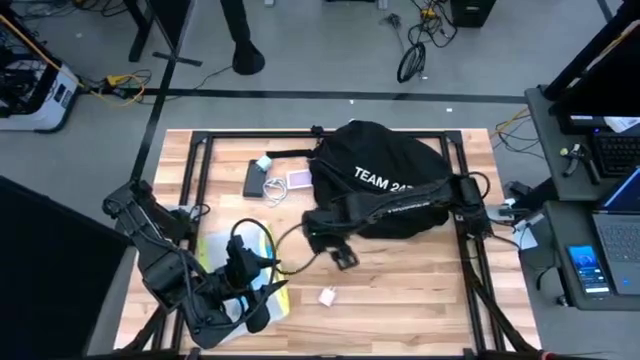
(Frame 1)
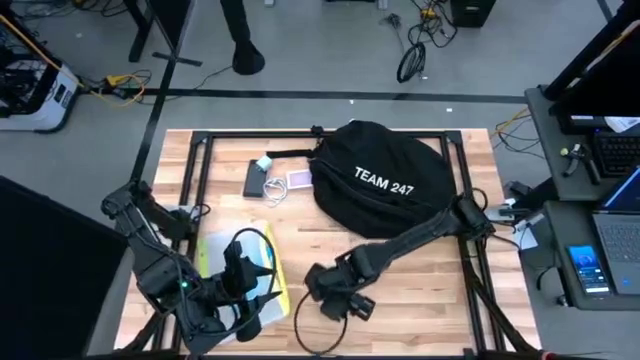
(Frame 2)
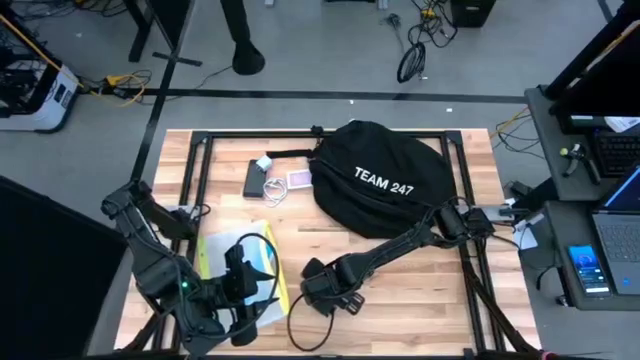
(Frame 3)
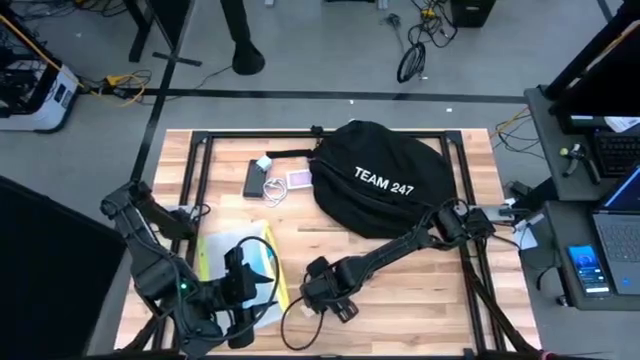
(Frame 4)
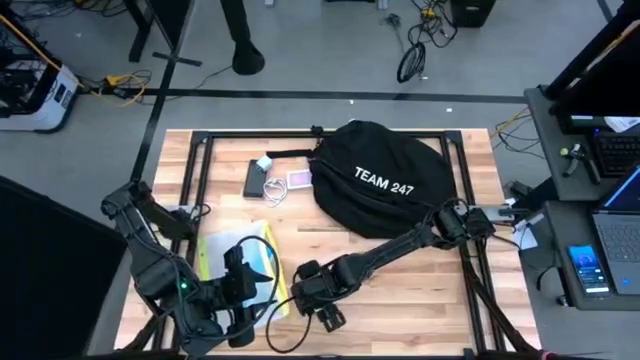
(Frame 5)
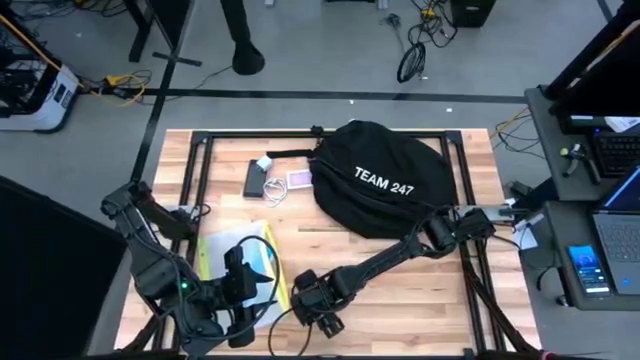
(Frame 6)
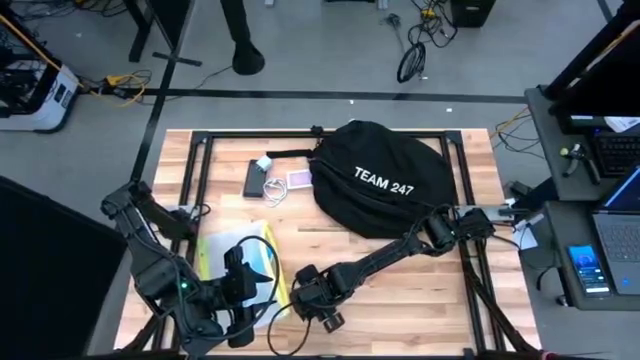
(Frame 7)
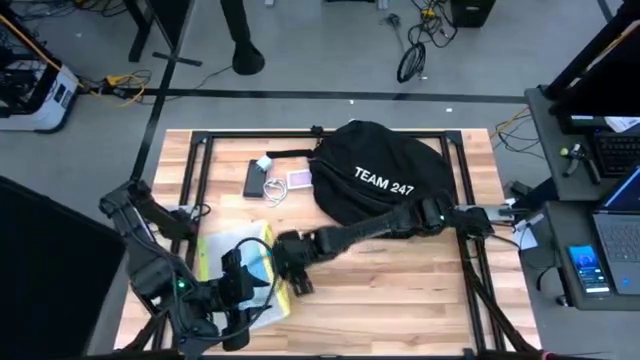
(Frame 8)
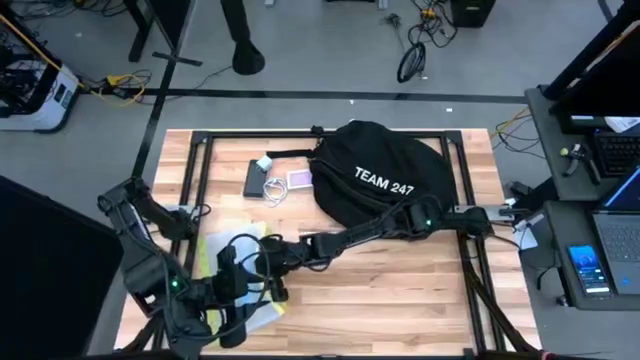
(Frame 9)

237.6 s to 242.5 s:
Task: Unpack backpack
Put the pink charger cable into the green zip bag

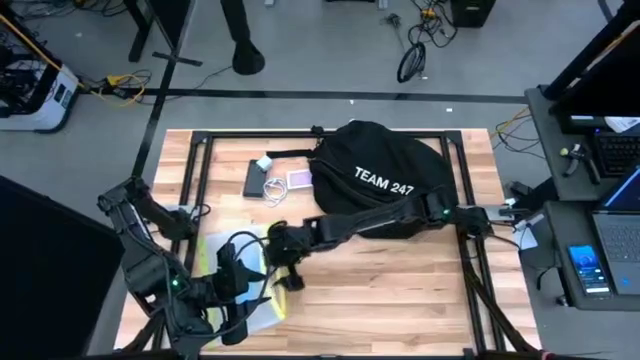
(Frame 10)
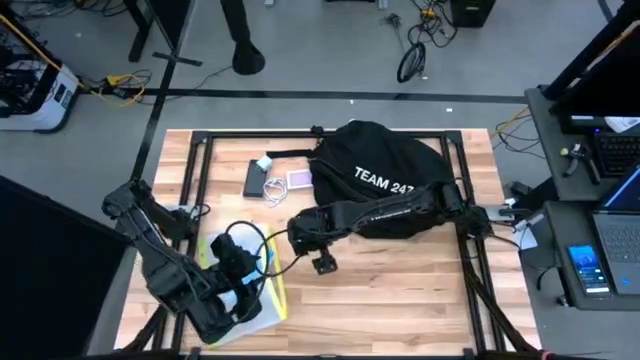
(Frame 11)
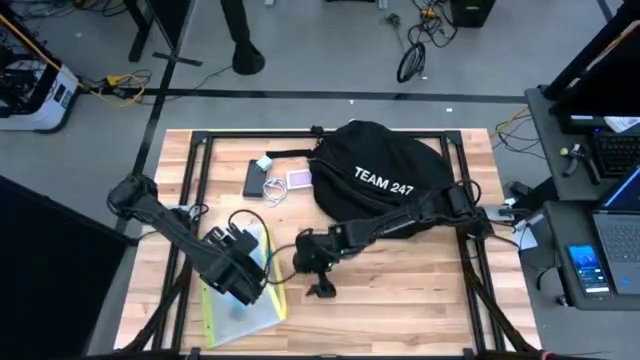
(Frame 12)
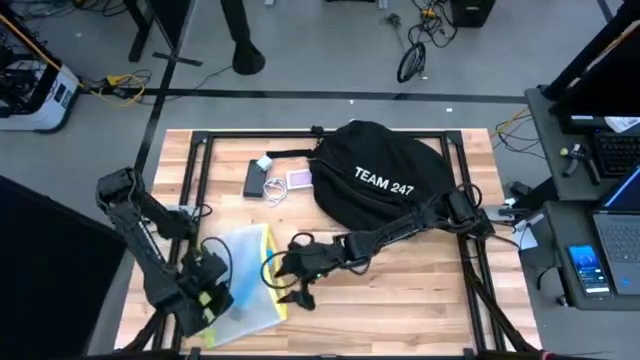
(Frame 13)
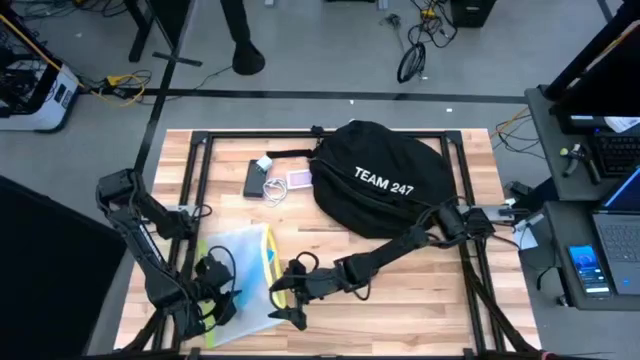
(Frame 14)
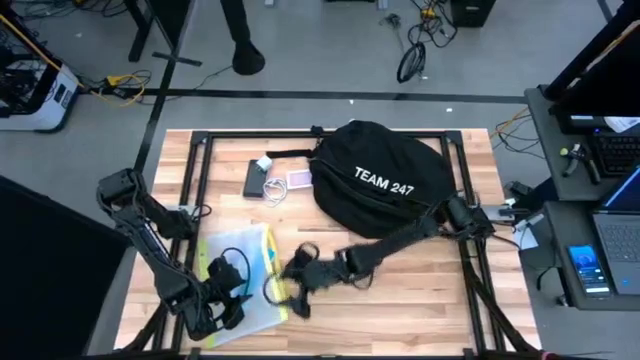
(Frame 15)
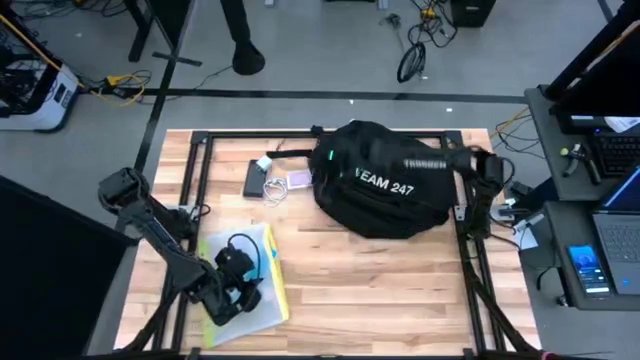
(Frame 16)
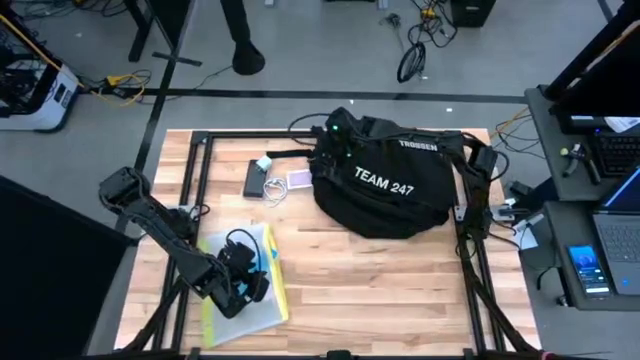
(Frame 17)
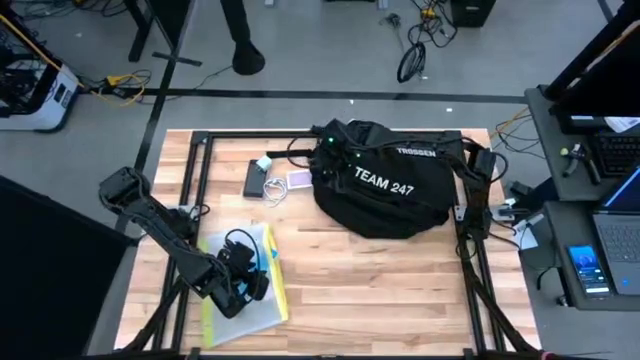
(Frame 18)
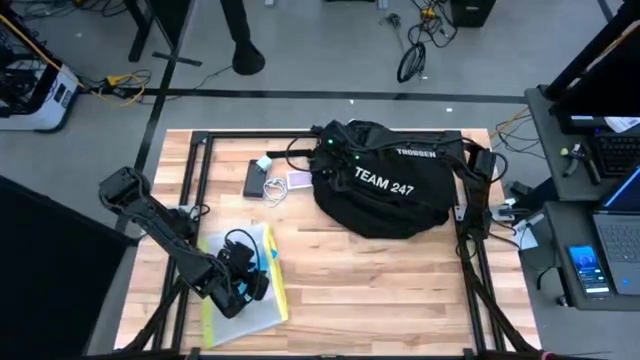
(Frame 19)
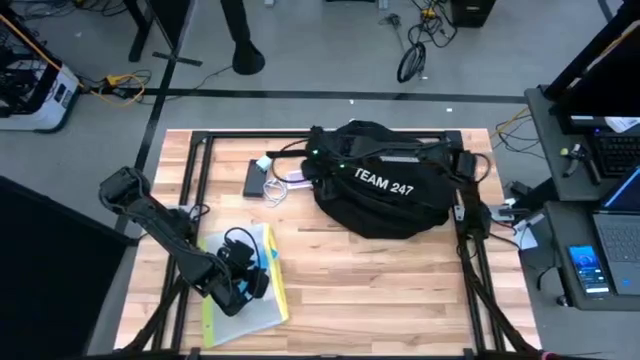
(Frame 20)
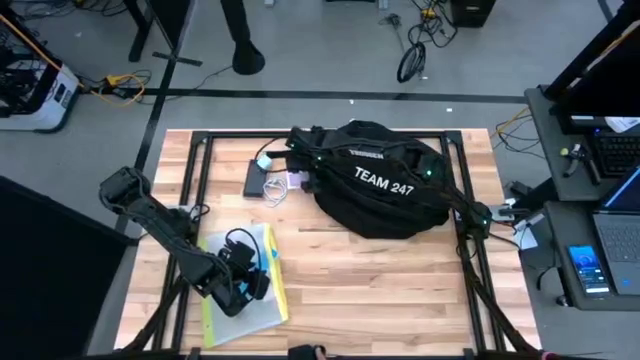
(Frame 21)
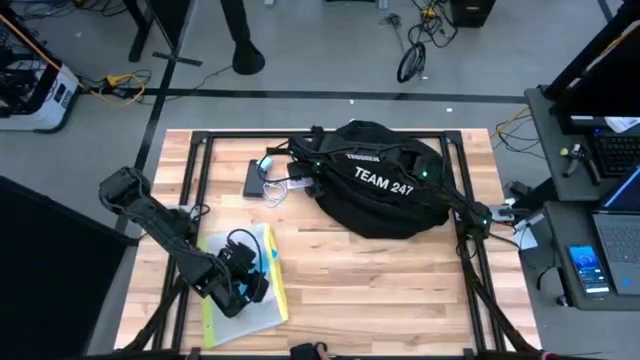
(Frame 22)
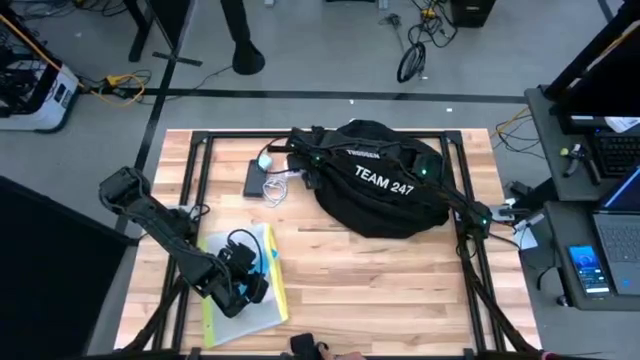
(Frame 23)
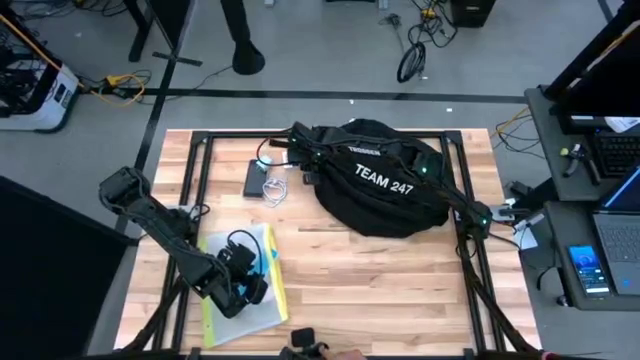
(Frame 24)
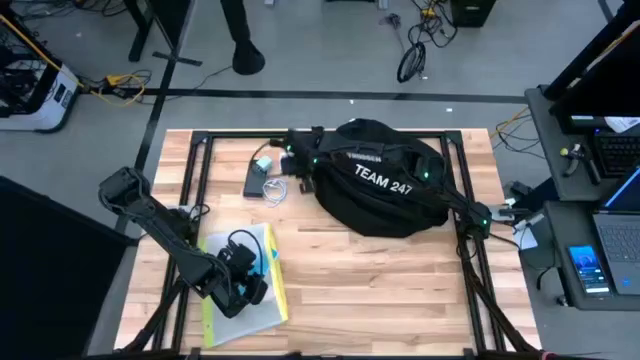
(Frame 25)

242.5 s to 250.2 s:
Put the game card into the green zip bag

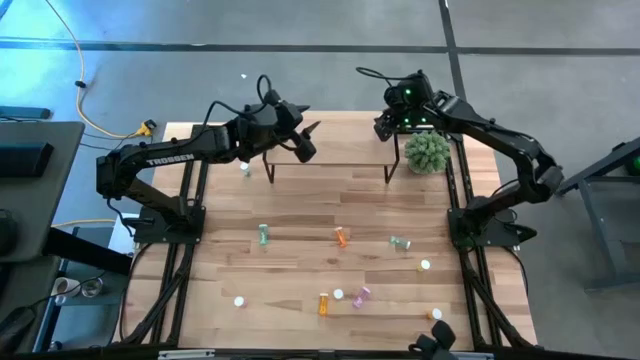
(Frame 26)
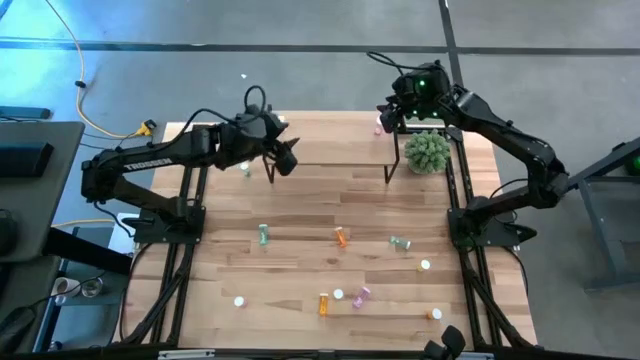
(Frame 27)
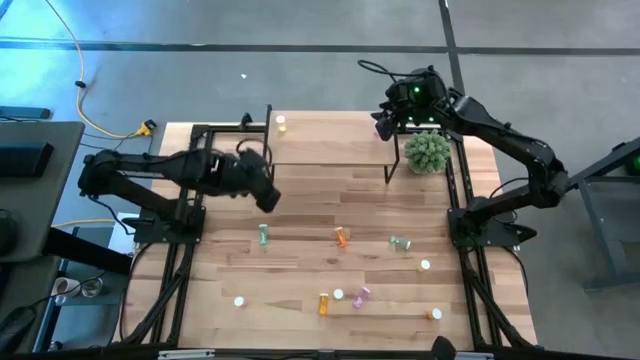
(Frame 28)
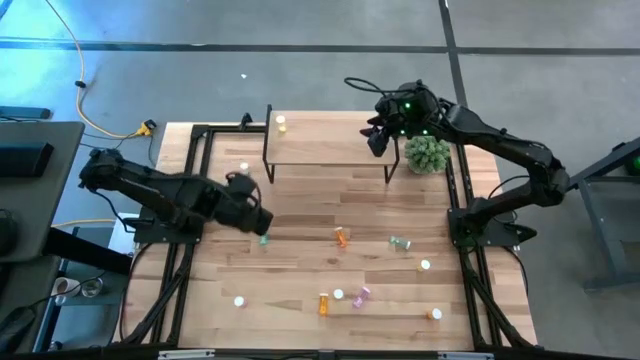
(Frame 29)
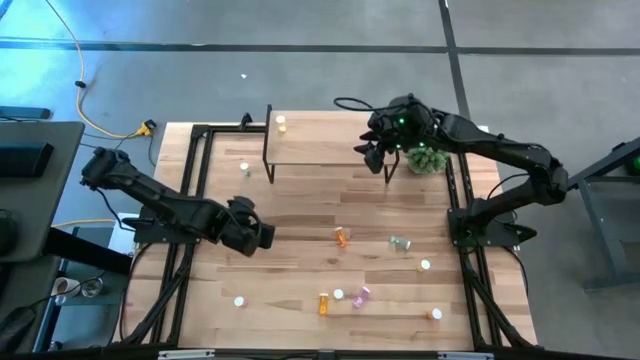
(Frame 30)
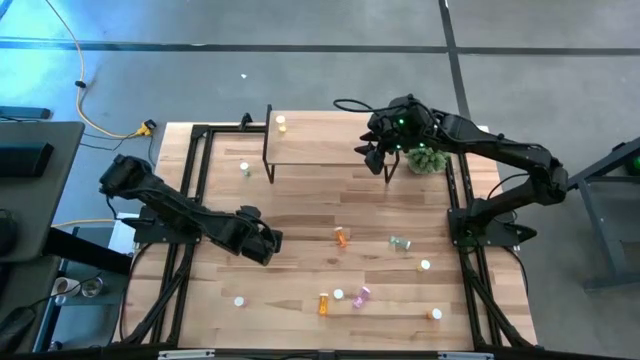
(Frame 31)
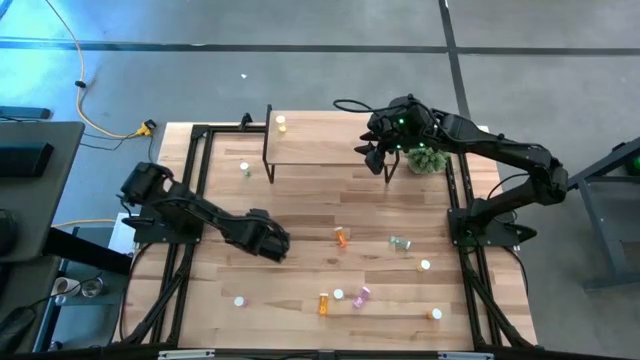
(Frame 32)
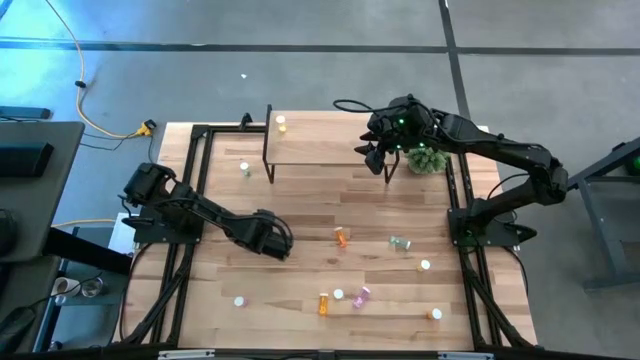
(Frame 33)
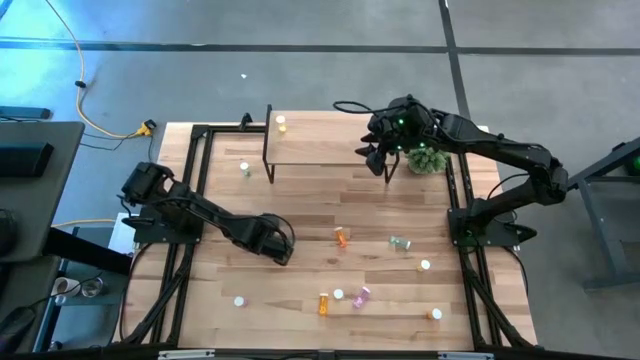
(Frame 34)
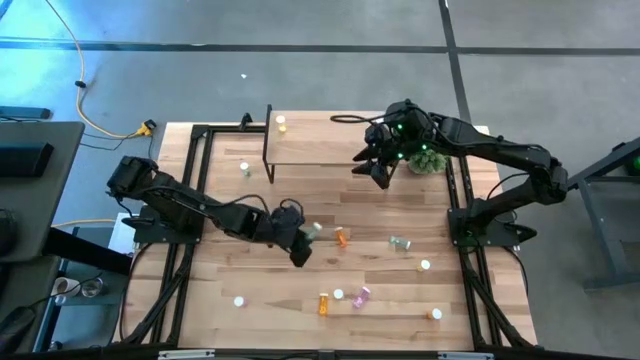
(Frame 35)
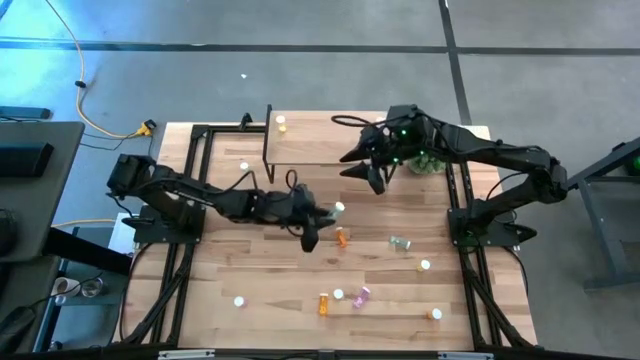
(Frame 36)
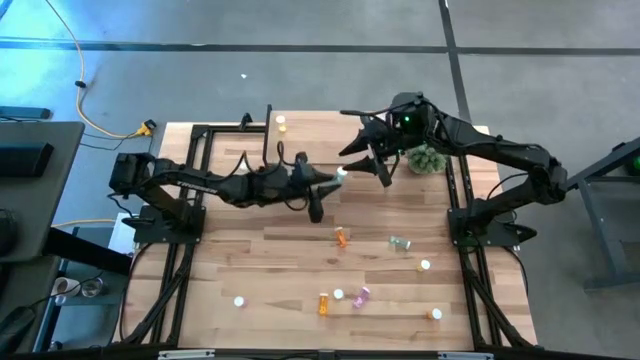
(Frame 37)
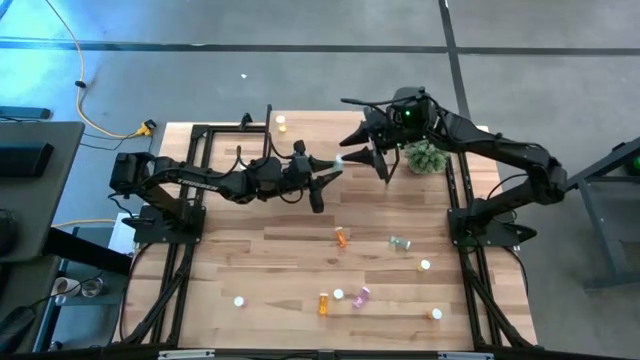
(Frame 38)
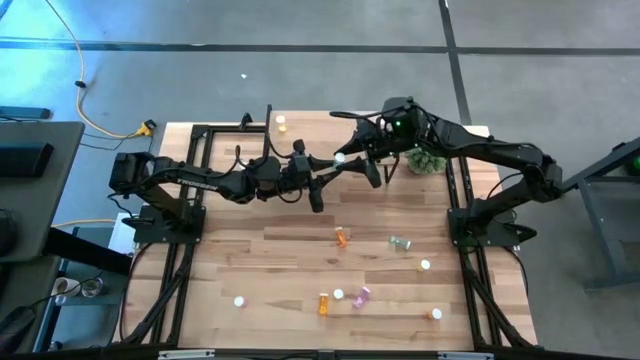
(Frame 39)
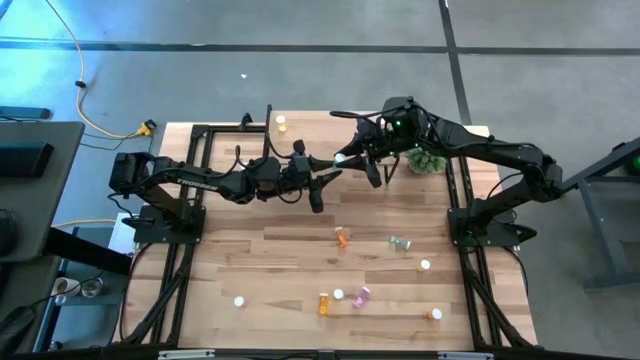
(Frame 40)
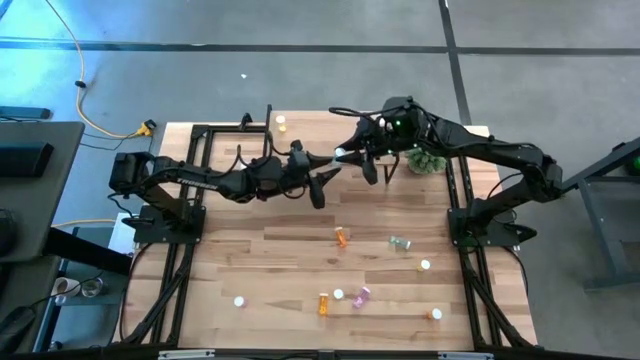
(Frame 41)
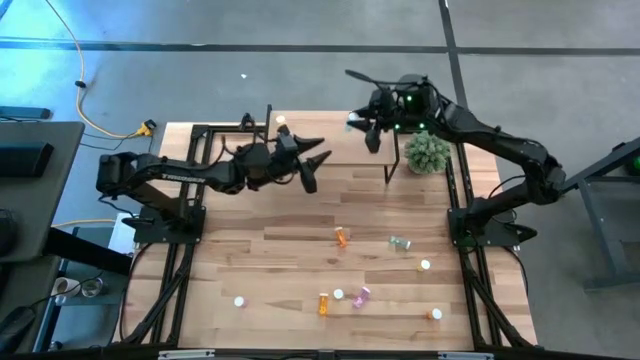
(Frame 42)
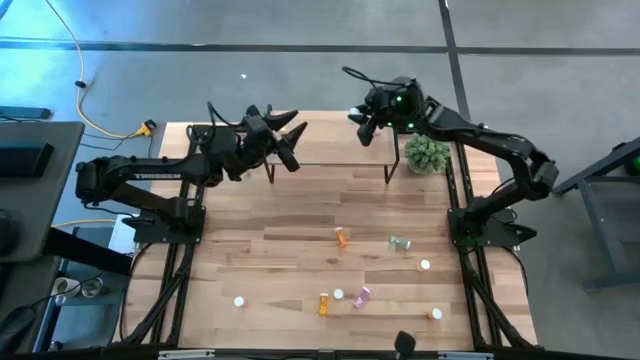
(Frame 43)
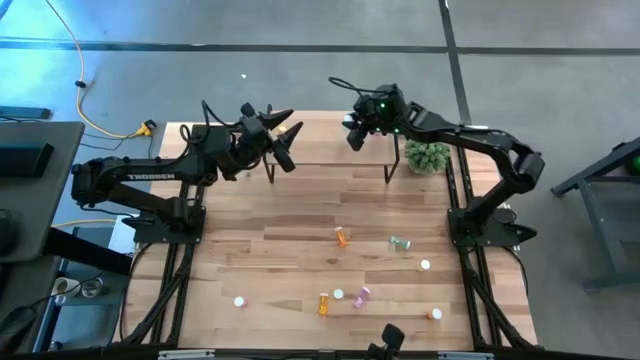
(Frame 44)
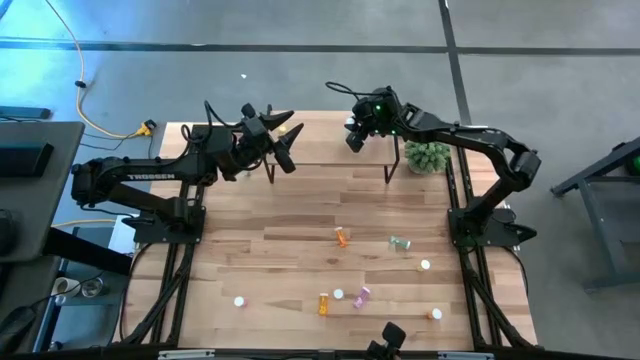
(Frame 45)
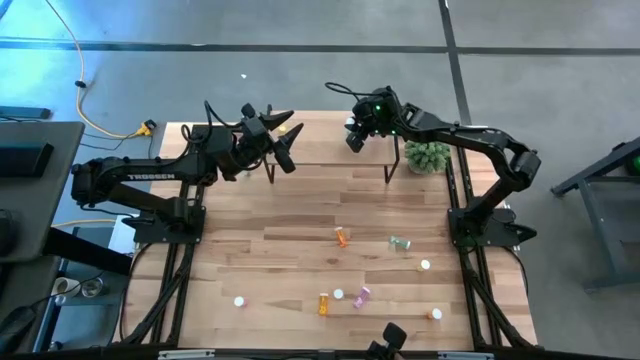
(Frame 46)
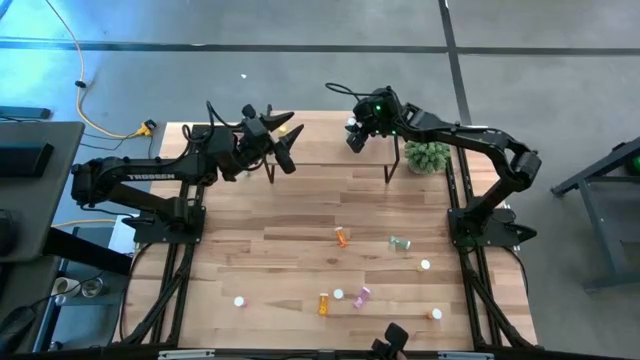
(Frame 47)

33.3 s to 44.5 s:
Task: Pick and place medicine bottles onto shelf by color
Put the bottom left blue pill bottle on the shelf
